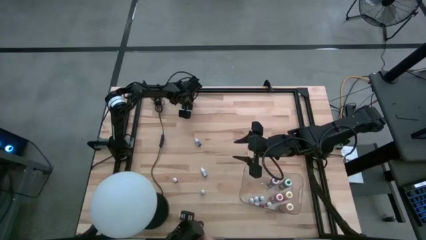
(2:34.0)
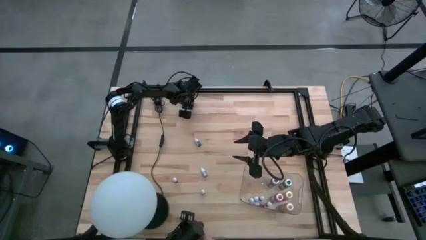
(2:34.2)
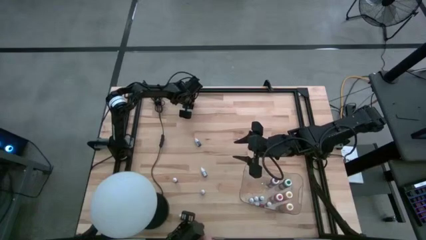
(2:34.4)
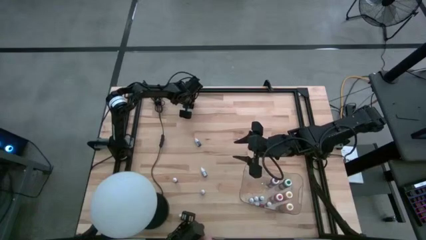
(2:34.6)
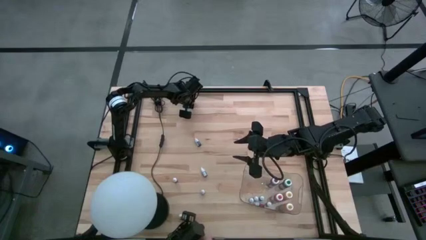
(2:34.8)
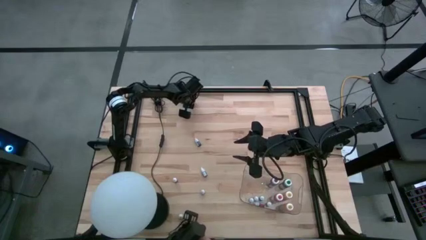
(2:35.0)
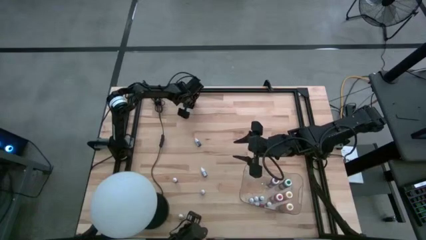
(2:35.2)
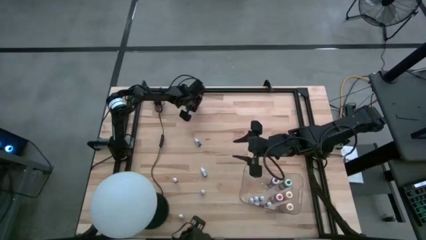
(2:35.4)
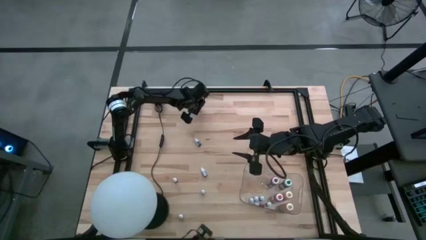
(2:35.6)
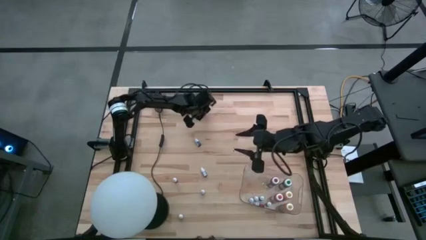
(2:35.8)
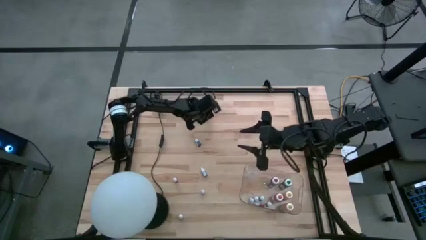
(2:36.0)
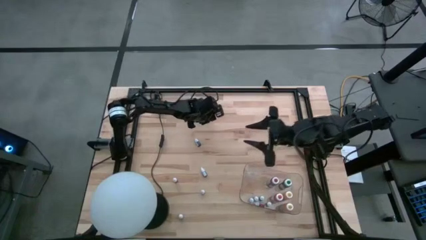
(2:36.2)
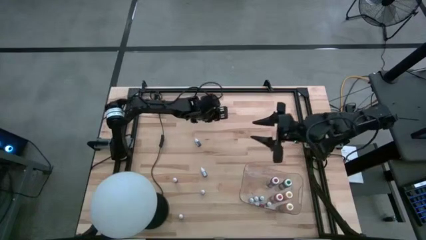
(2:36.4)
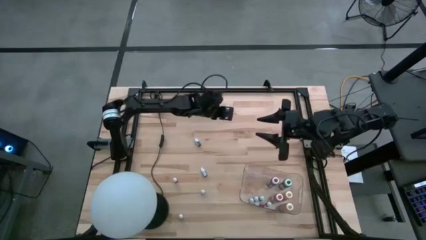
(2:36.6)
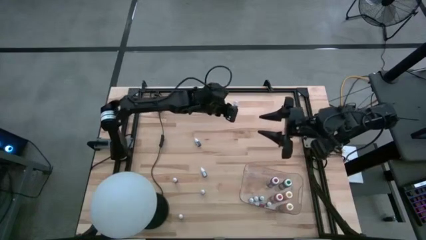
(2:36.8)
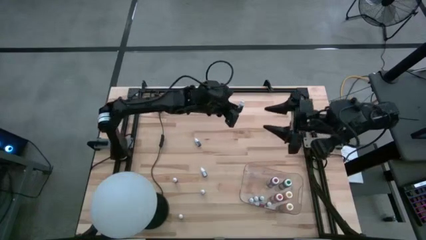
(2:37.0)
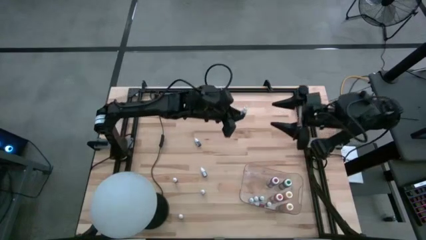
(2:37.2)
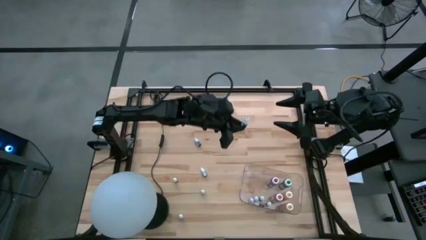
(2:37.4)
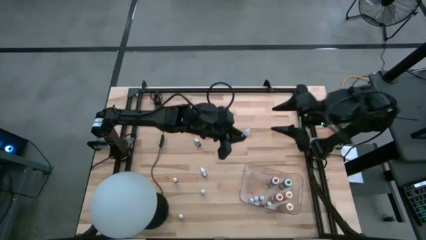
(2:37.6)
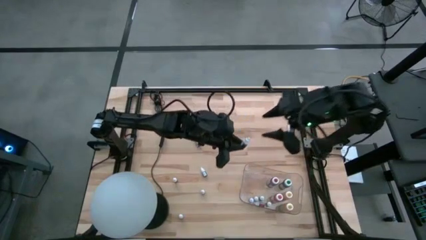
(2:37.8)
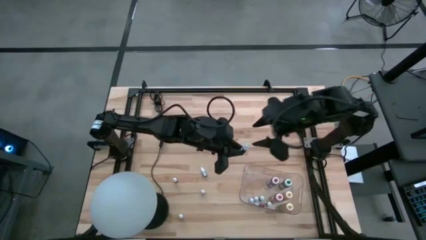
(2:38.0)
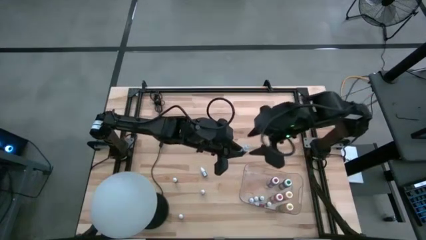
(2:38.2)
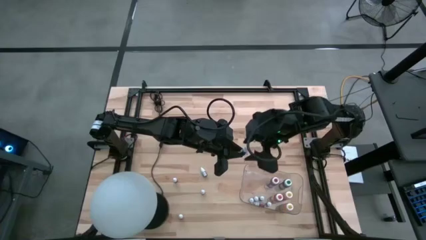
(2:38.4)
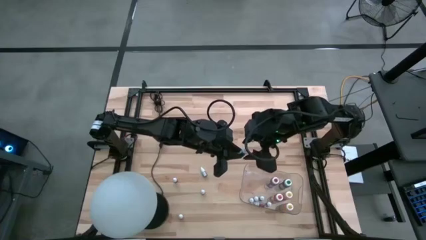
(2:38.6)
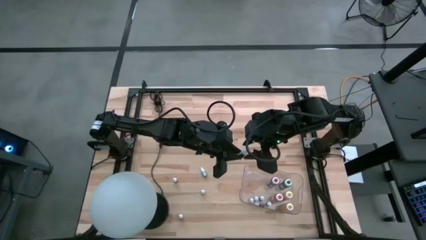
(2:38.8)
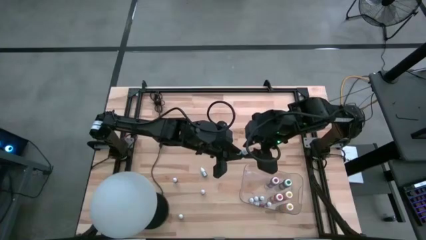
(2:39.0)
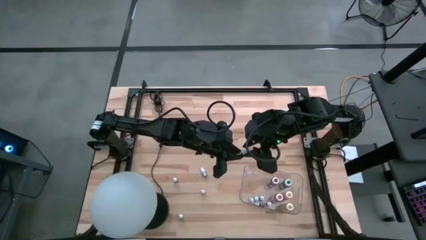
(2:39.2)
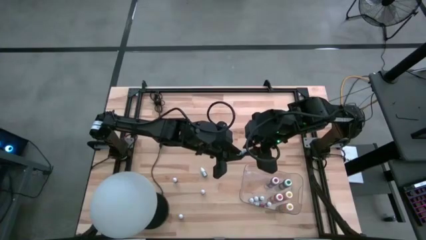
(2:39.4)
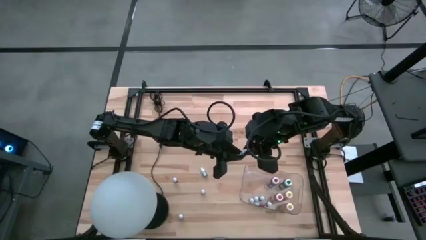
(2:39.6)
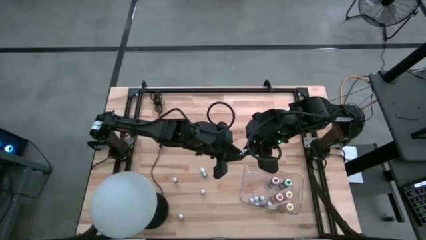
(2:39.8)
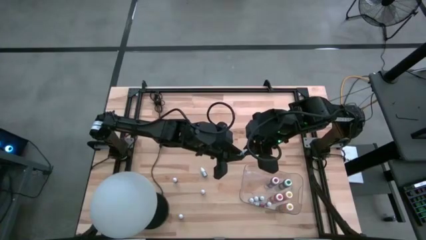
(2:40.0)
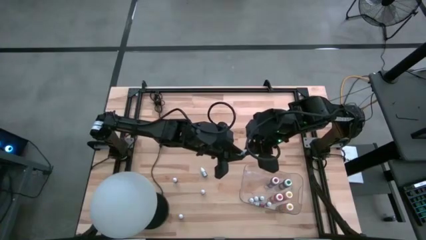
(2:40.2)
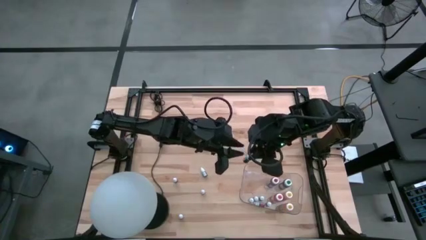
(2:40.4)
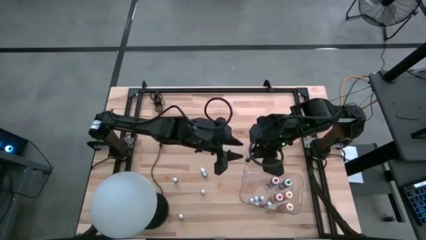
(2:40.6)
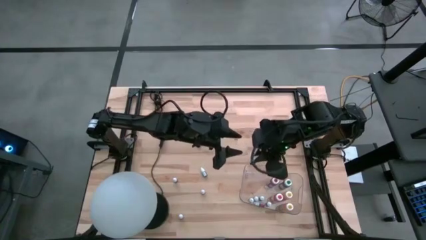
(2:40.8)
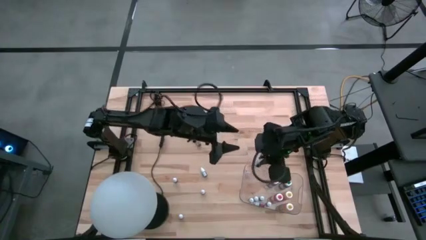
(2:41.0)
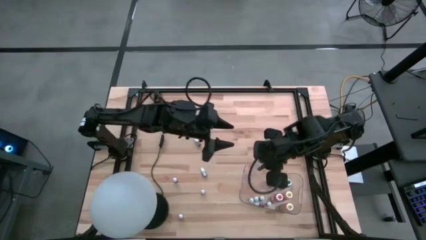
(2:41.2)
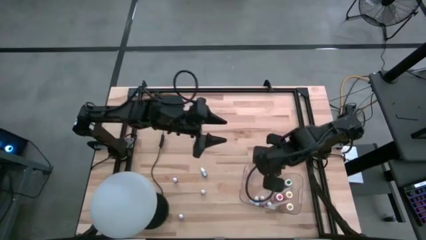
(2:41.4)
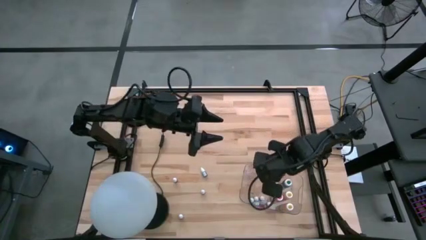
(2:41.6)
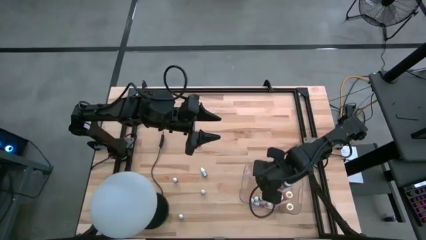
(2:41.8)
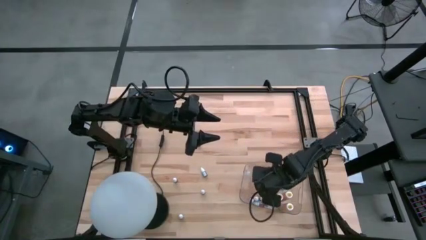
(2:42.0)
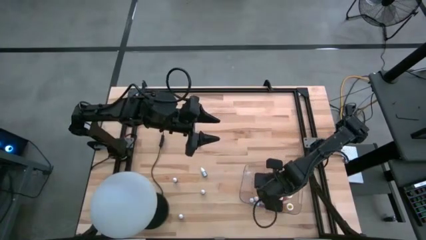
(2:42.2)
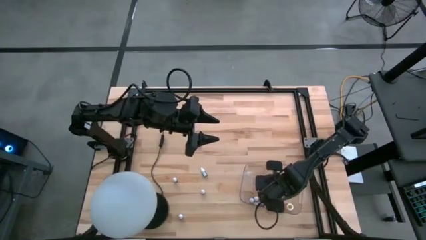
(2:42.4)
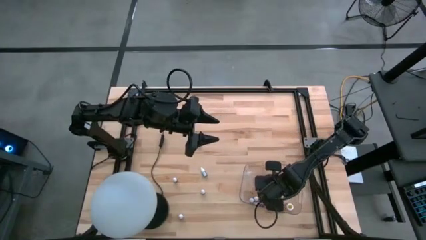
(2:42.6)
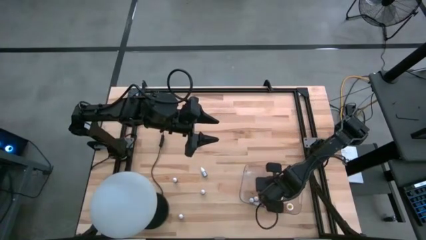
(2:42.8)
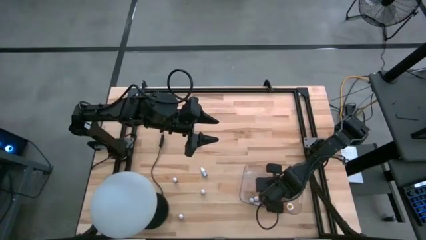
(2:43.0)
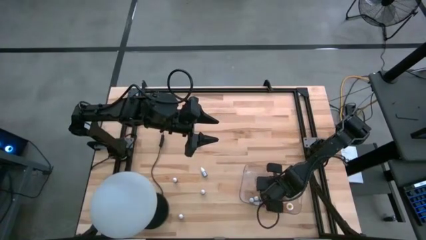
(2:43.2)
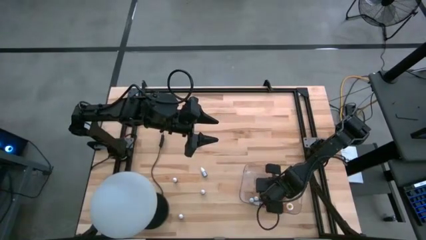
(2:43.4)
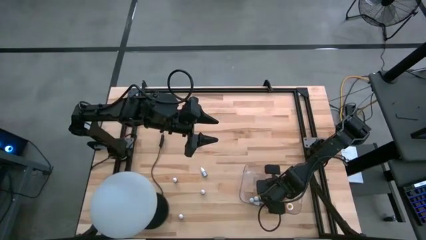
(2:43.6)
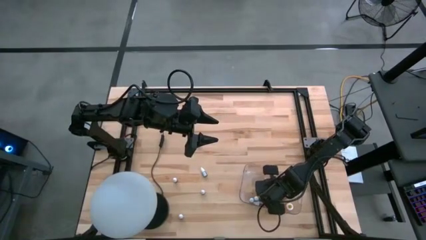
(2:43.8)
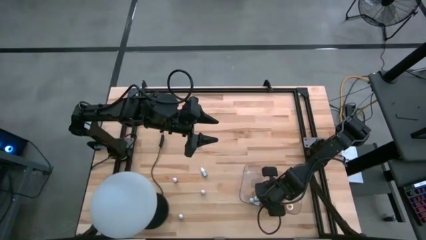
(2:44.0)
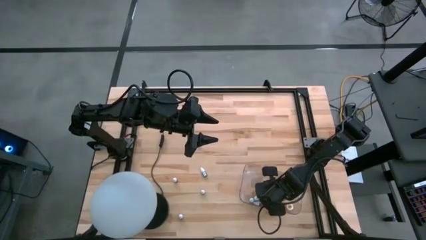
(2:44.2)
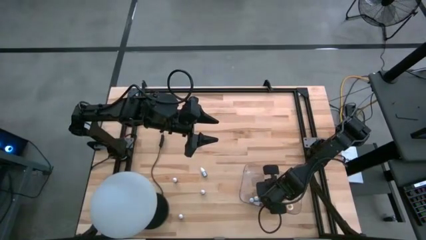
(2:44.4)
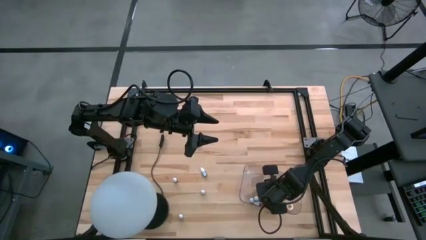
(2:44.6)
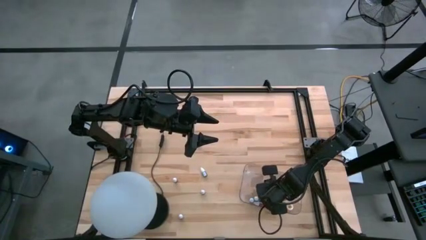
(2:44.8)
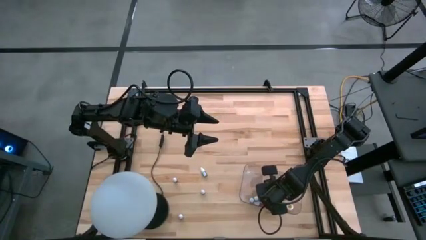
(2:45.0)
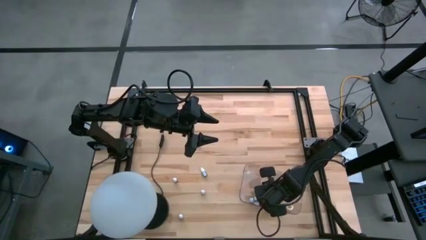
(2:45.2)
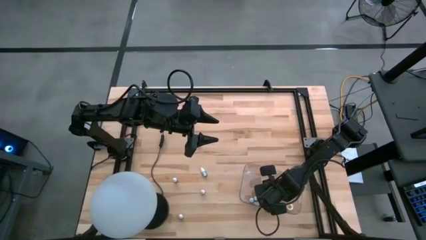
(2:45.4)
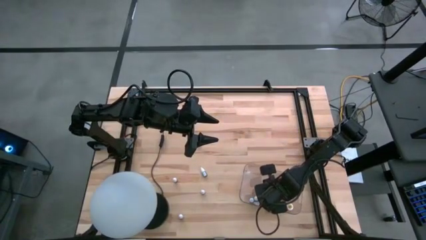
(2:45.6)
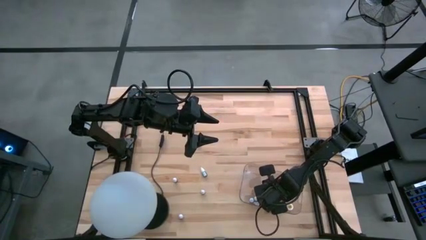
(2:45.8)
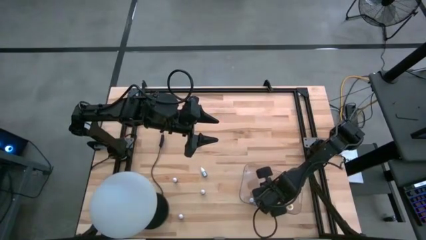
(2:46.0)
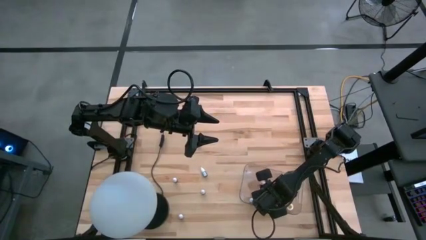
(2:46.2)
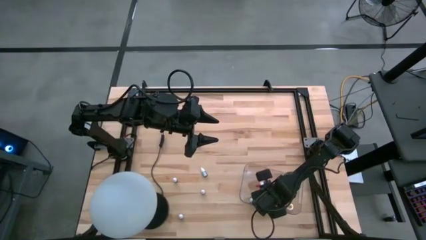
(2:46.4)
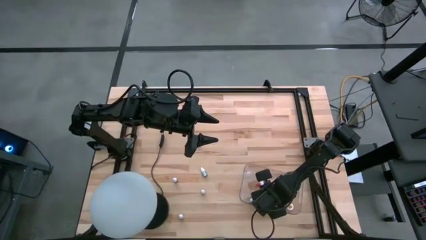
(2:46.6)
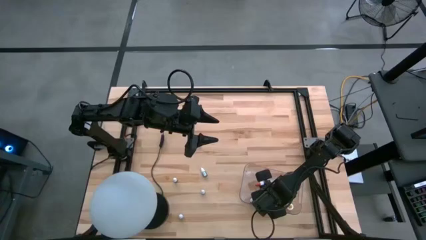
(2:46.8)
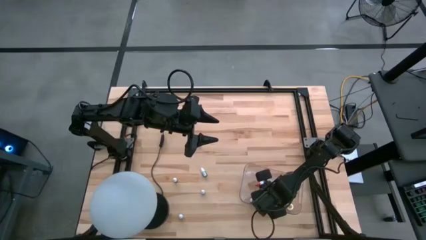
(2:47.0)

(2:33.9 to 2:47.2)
Task: Pick & Place food coloring
Put the black food color into the transparent bin

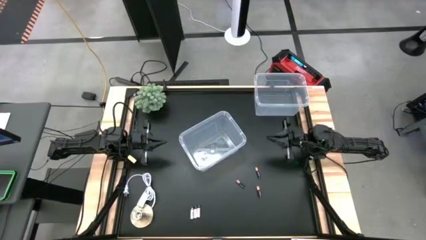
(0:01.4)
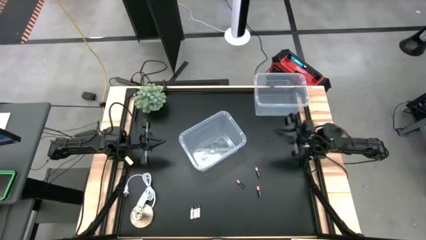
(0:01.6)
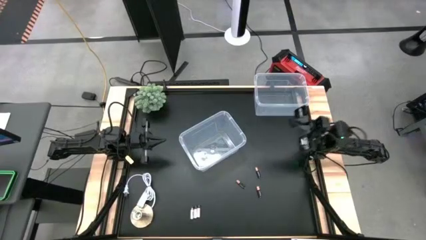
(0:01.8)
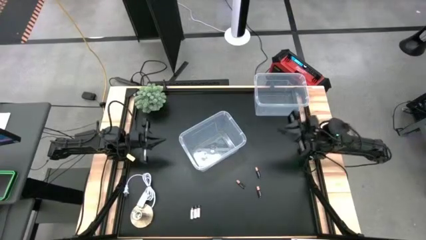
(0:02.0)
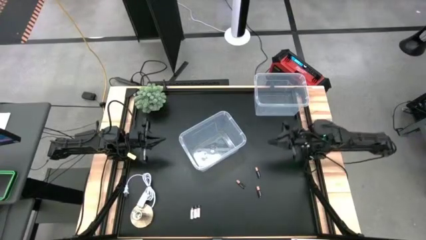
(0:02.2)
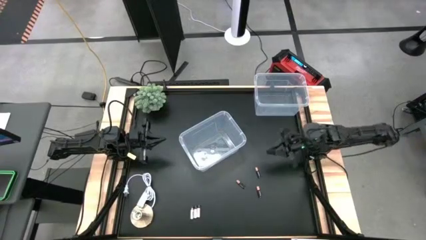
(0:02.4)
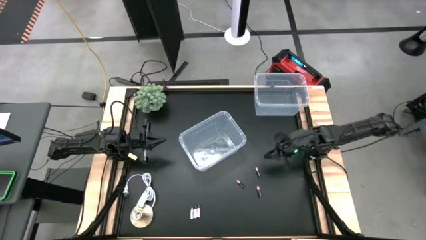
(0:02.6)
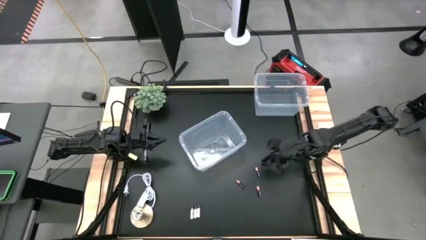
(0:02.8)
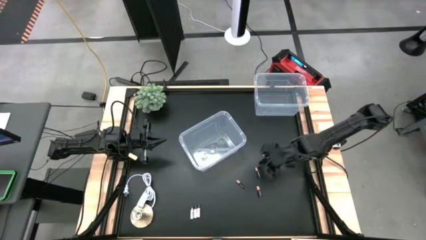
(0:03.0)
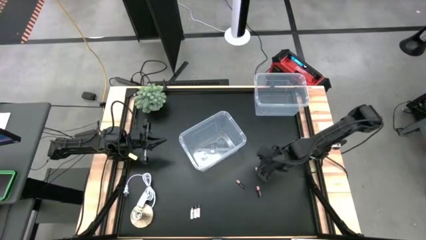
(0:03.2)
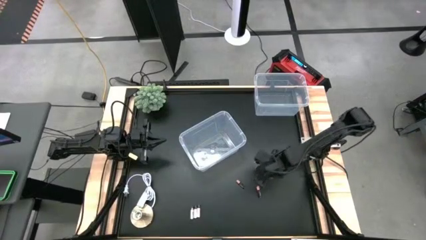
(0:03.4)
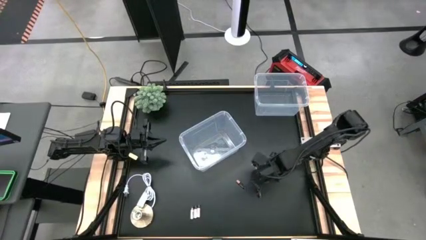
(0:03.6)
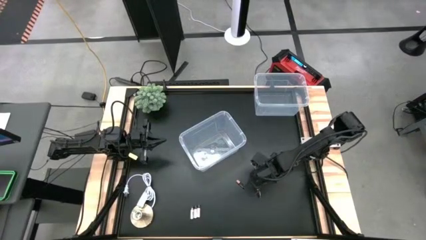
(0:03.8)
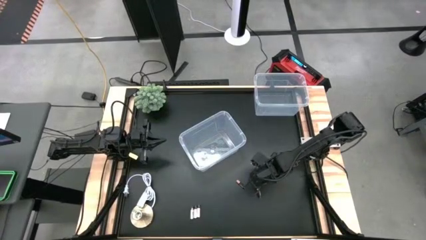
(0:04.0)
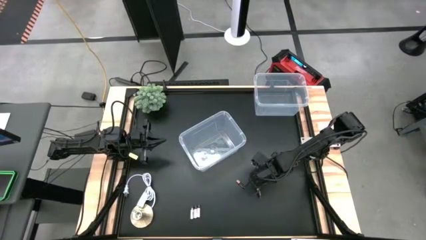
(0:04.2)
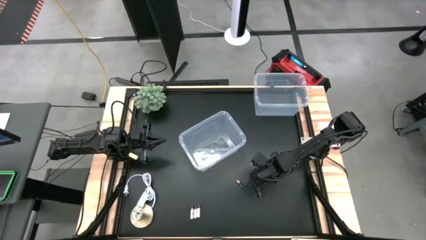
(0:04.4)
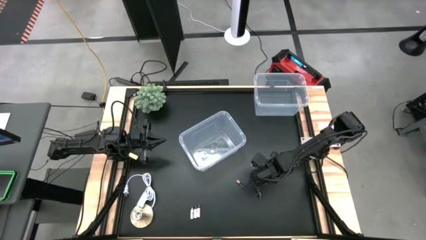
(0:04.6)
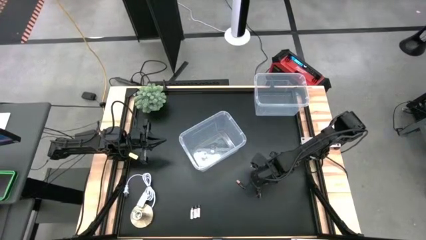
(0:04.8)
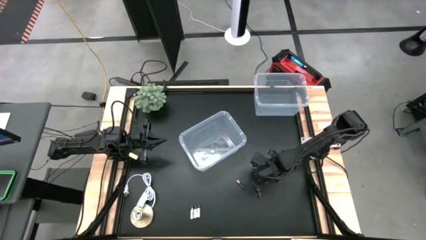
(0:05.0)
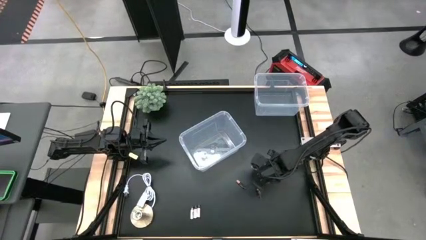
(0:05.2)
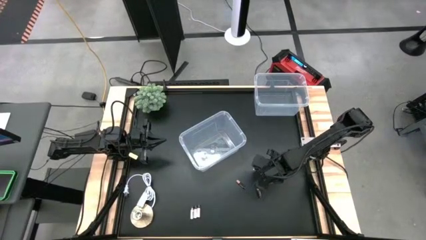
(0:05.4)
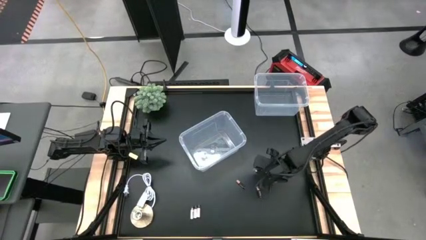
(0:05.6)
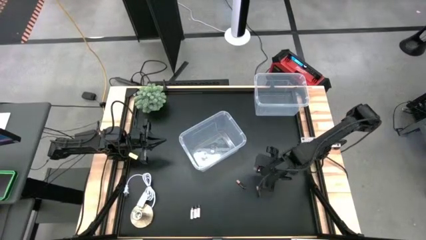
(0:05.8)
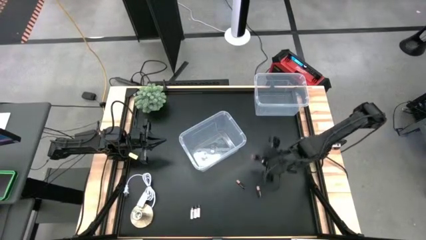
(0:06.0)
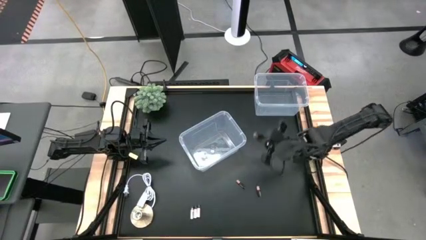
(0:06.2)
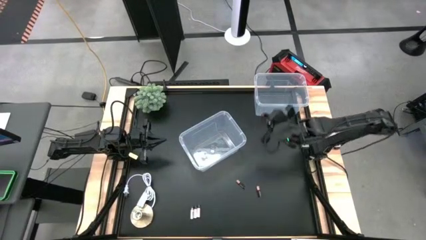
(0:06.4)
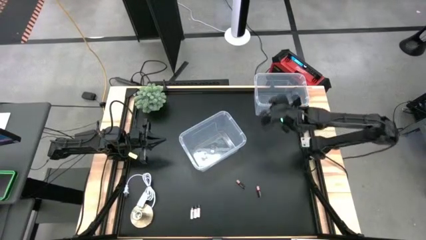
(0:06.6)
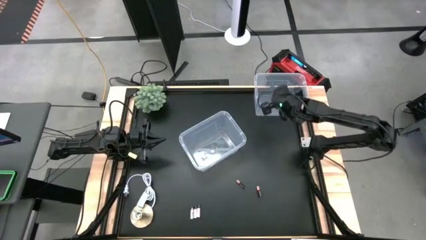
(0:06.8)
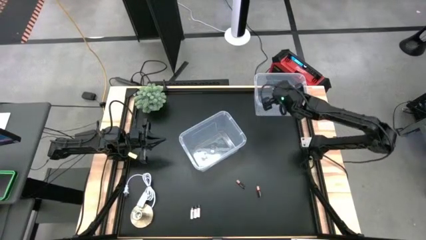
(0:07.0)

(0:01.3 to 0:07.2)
Task: Sort batteries
Put the top black battery into the top transparent bin
